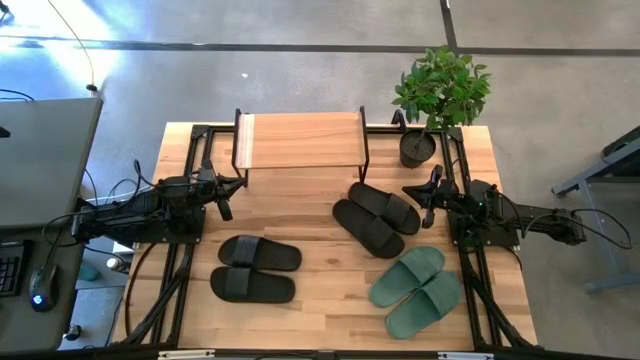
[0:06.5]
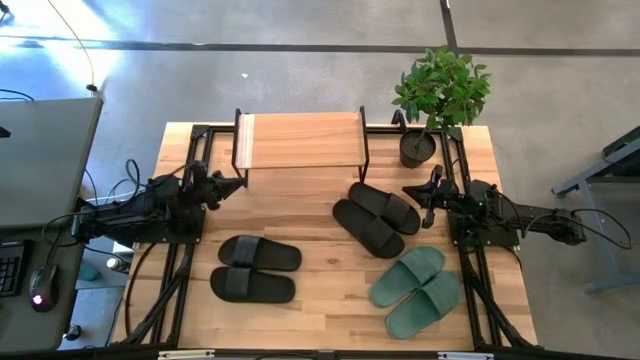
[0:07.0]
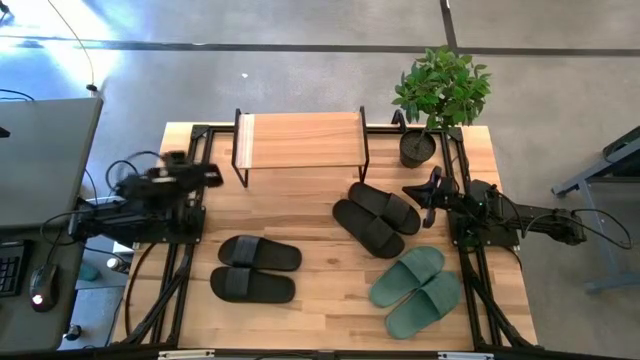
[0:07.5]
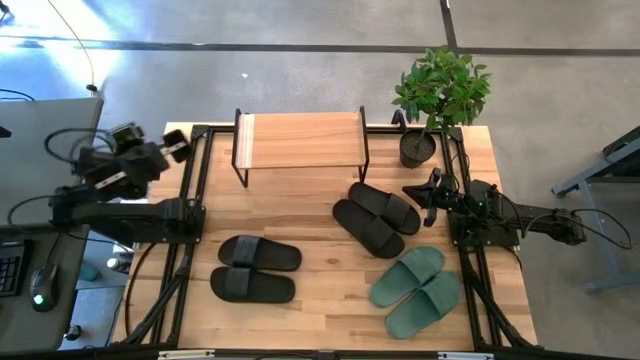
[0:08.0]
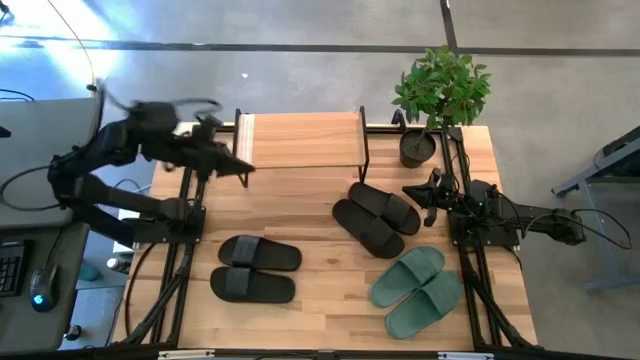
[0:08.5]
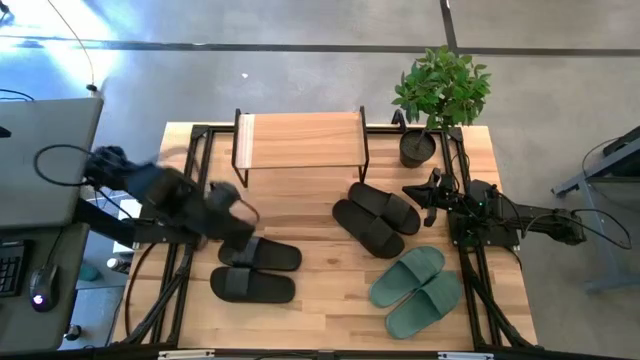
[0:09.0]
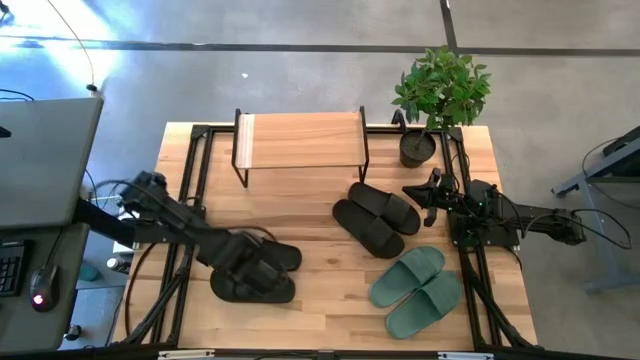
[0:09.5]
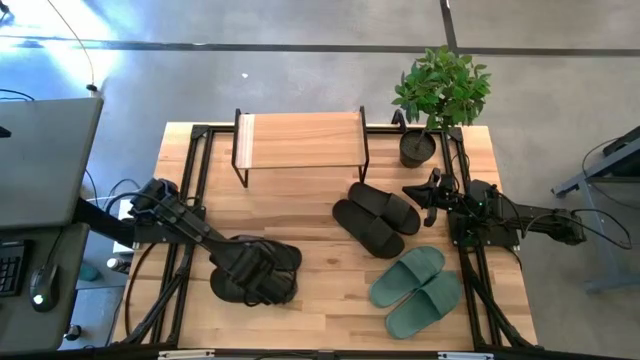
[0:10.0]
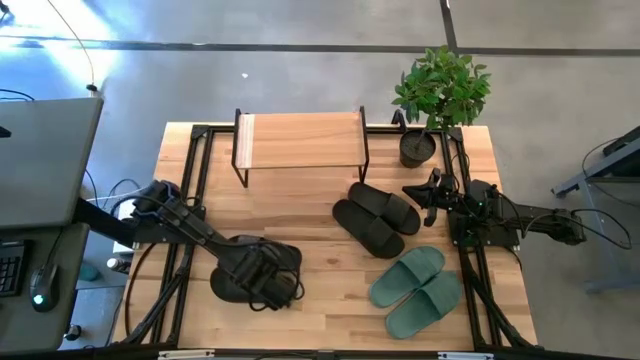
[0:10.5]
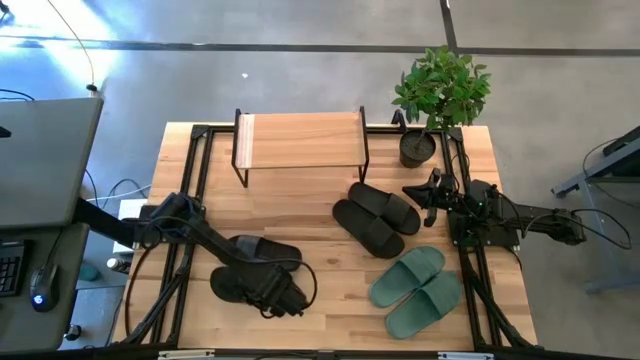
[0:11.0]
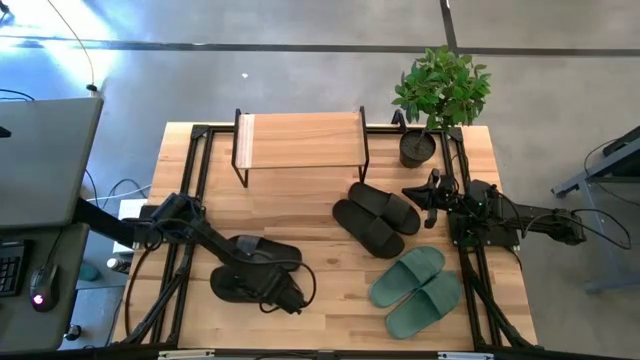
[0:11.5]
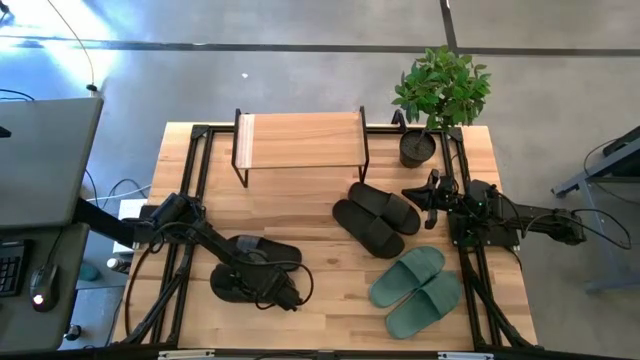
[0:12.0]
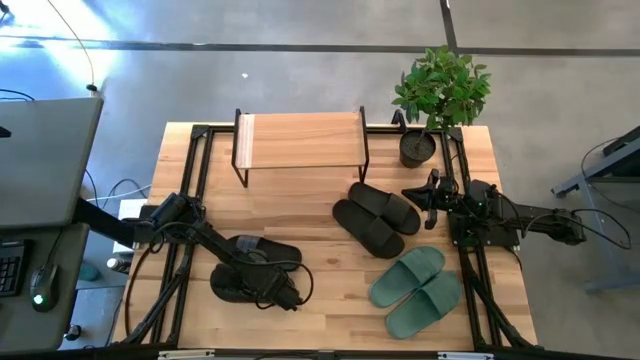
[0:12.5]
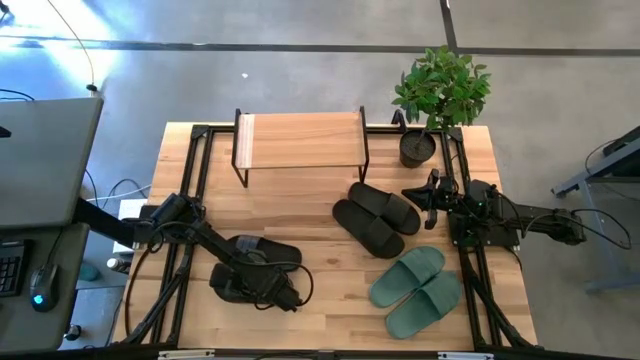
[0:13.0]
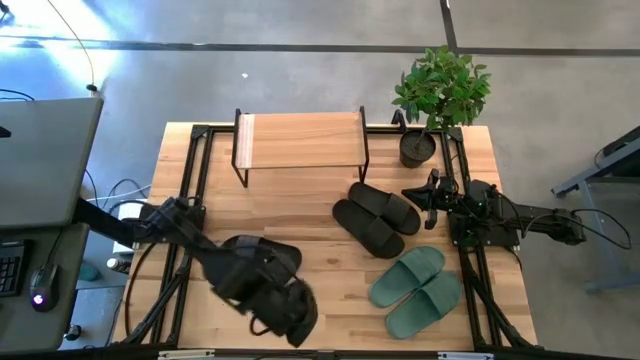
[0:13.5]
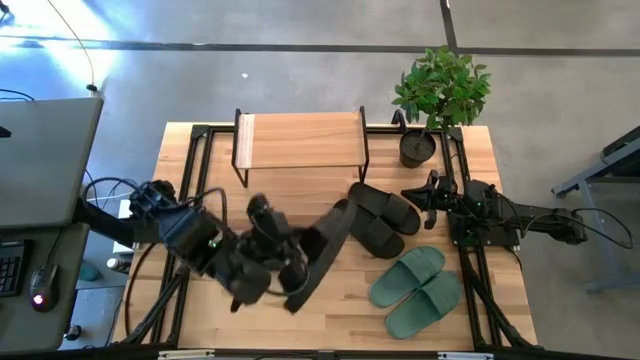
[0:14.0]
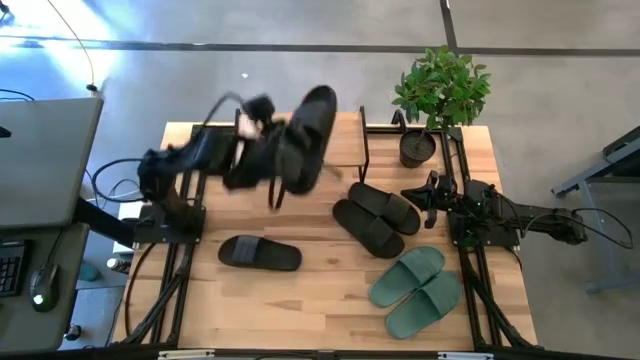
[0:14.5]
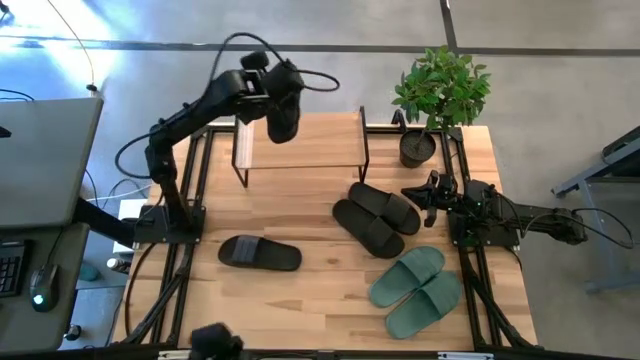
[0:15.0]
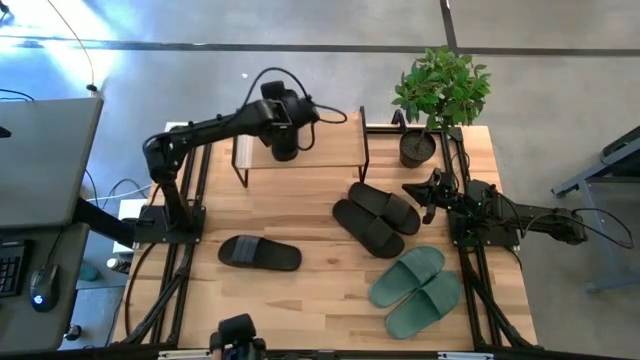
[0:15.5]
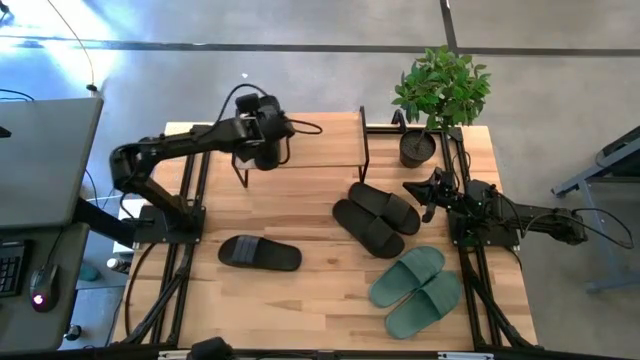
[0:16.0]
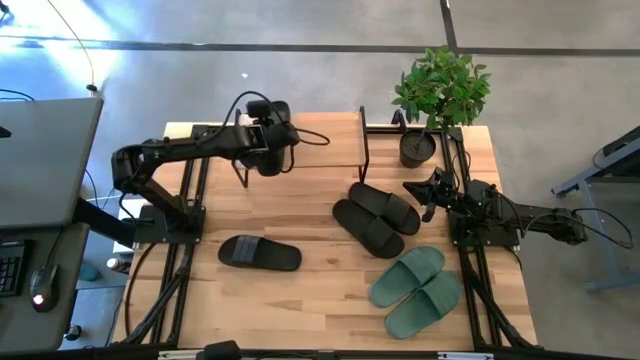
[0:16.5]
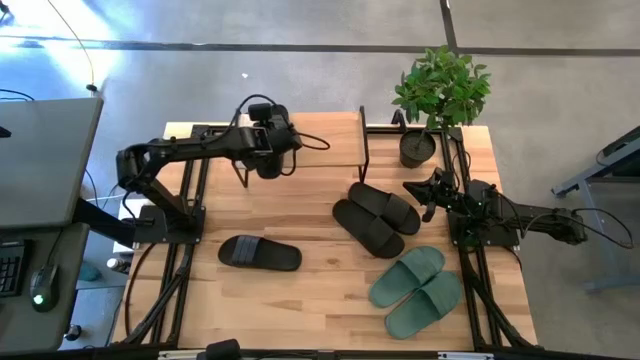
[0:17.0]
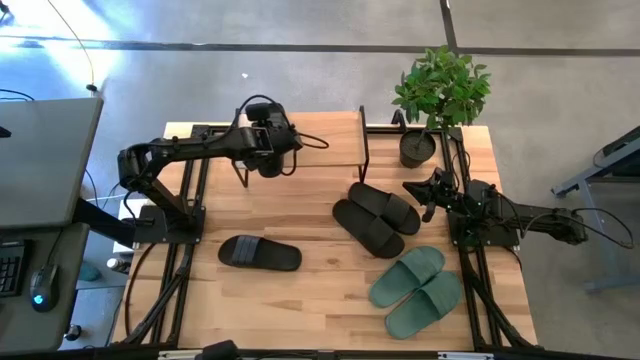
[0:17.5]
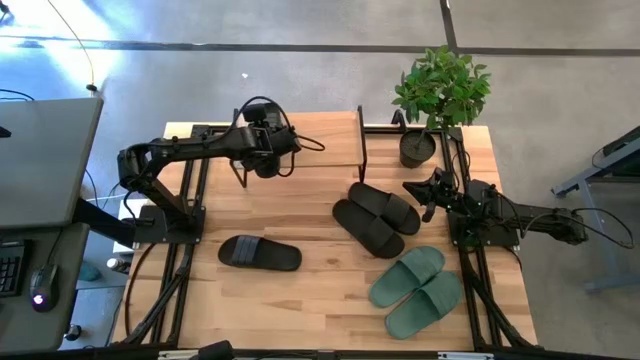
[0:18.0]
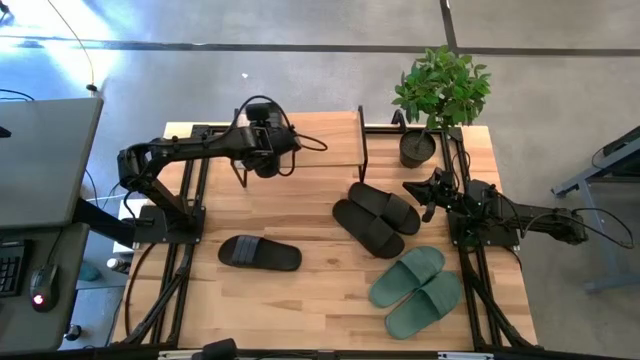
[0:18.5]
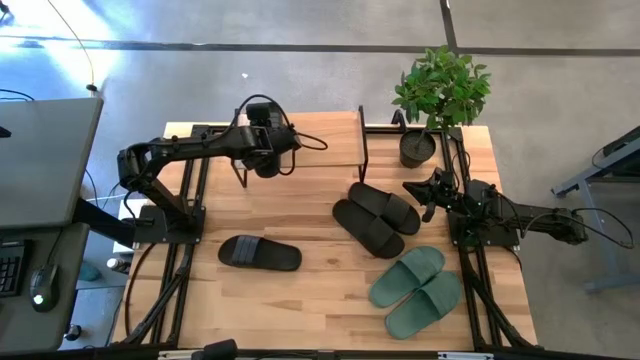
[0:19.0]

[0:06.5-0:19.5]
Task: Pick and place slides into the shelf
Put the bottom black slide on the shelf
